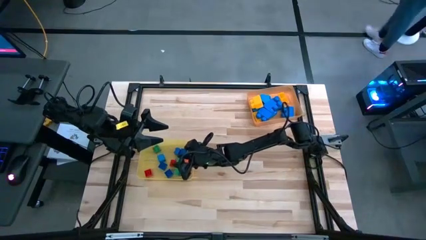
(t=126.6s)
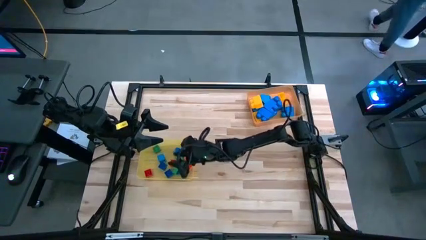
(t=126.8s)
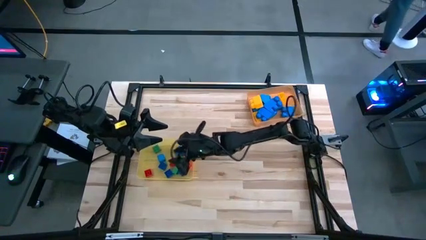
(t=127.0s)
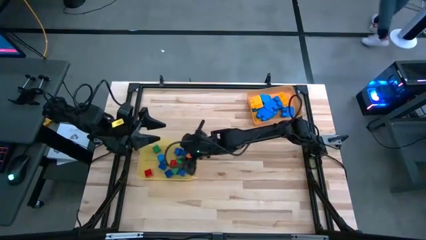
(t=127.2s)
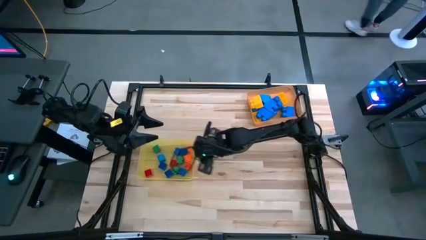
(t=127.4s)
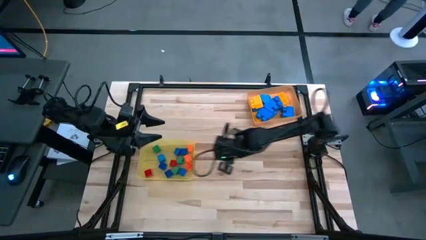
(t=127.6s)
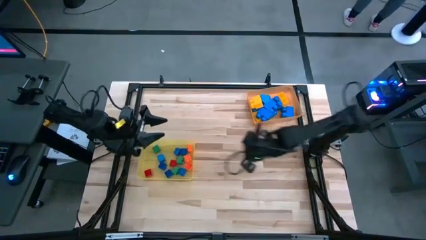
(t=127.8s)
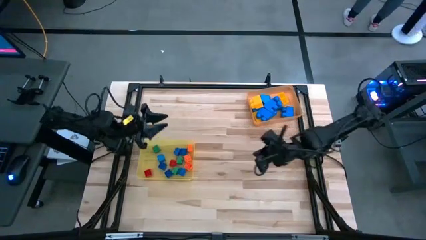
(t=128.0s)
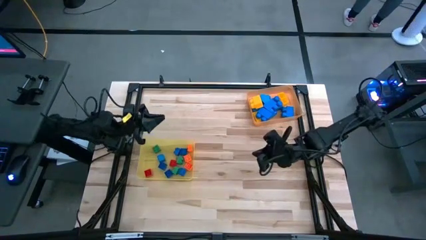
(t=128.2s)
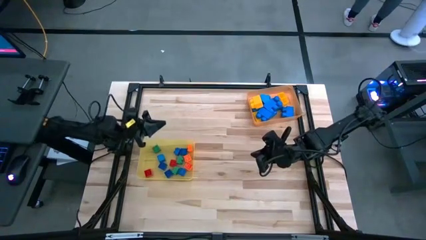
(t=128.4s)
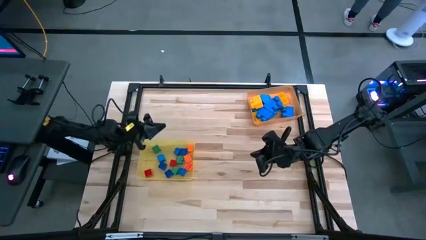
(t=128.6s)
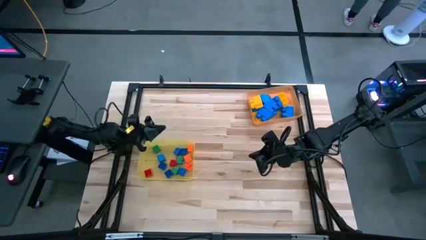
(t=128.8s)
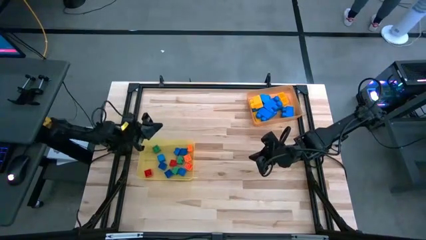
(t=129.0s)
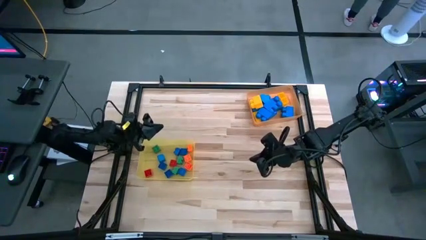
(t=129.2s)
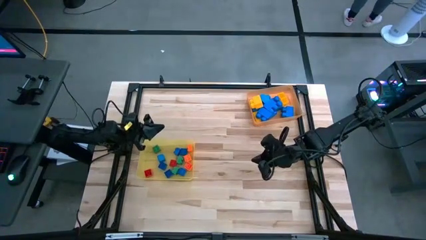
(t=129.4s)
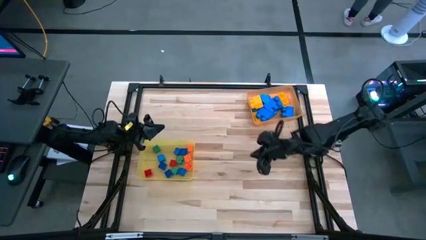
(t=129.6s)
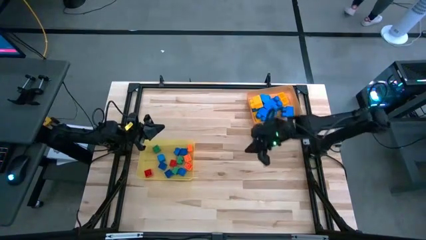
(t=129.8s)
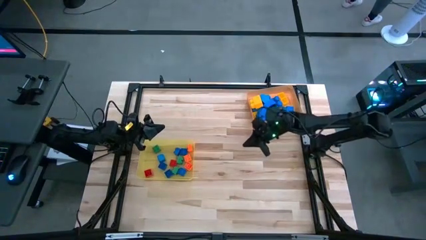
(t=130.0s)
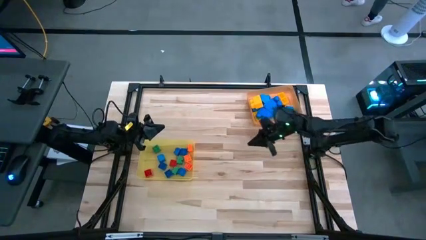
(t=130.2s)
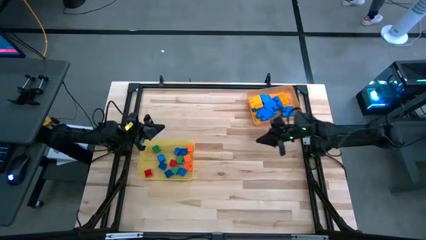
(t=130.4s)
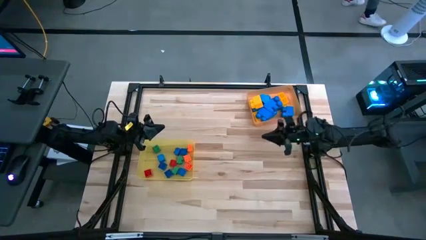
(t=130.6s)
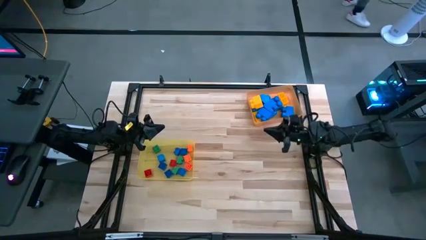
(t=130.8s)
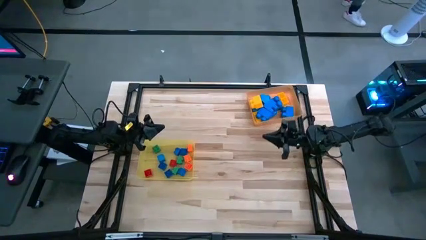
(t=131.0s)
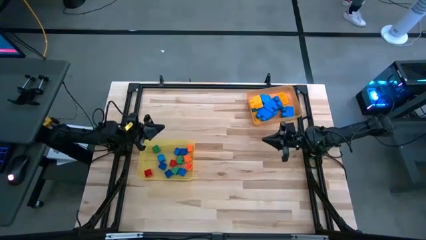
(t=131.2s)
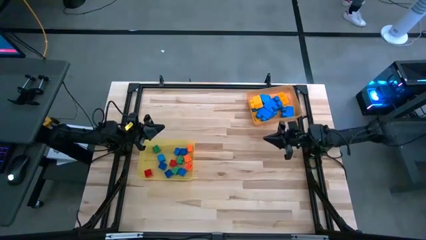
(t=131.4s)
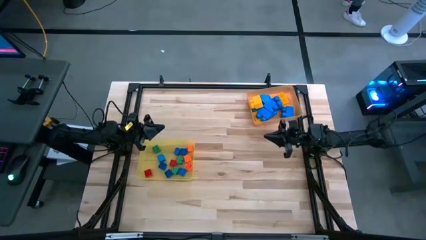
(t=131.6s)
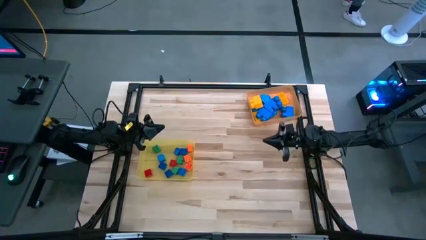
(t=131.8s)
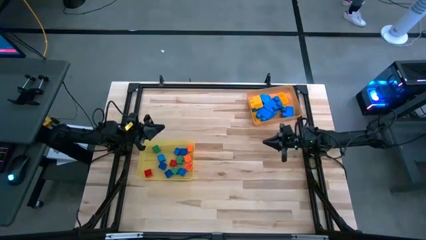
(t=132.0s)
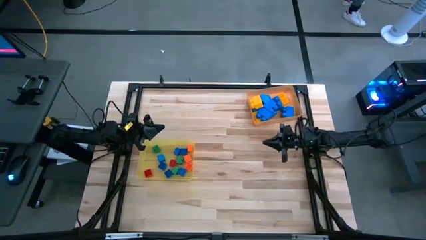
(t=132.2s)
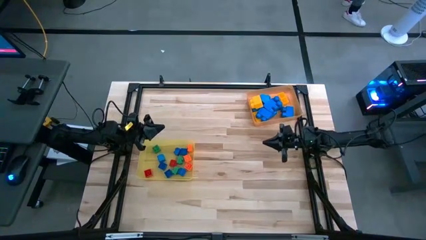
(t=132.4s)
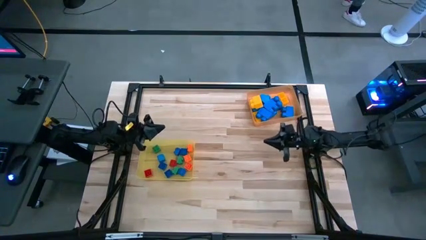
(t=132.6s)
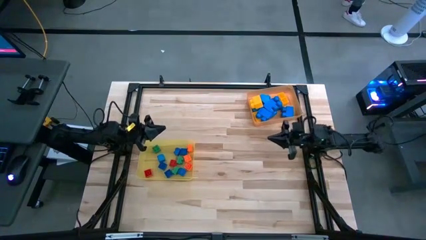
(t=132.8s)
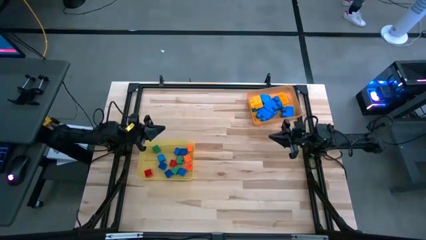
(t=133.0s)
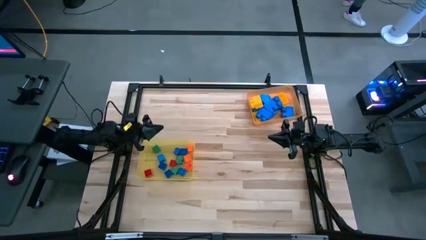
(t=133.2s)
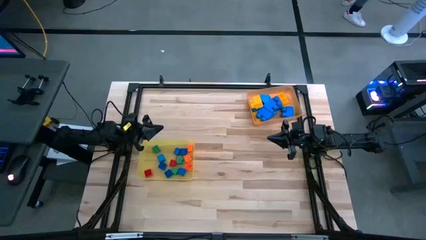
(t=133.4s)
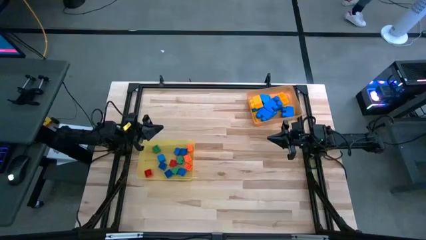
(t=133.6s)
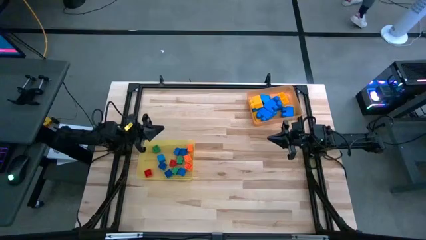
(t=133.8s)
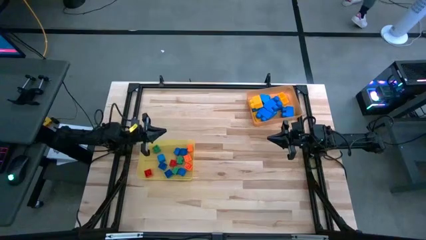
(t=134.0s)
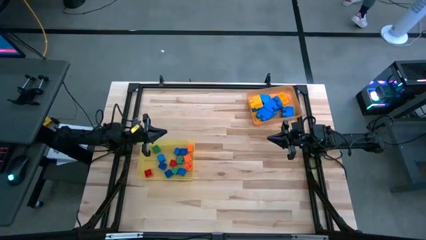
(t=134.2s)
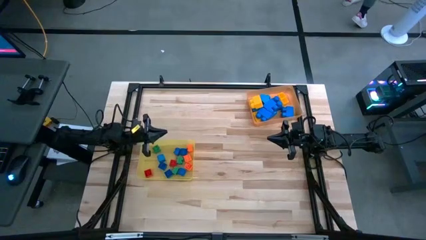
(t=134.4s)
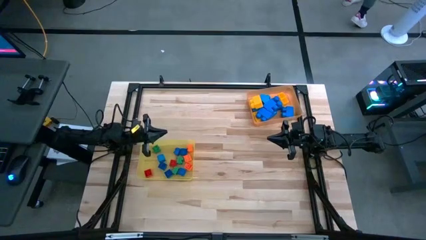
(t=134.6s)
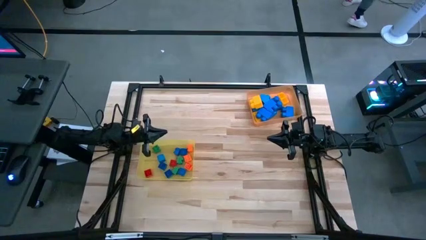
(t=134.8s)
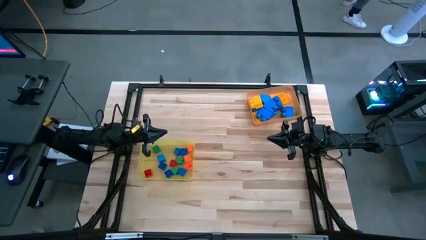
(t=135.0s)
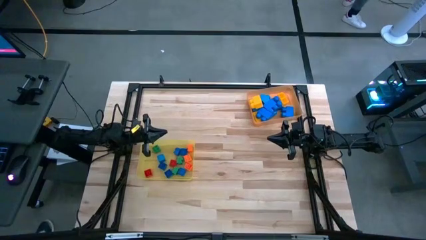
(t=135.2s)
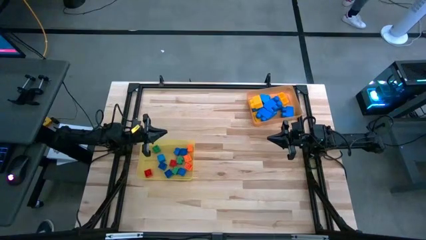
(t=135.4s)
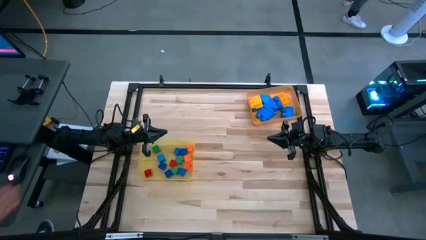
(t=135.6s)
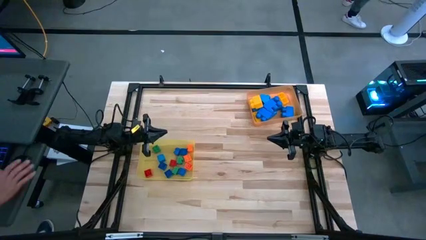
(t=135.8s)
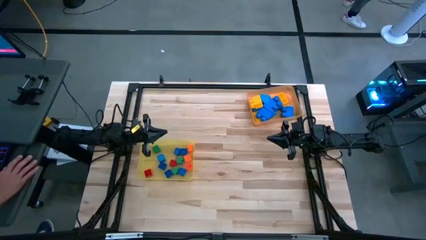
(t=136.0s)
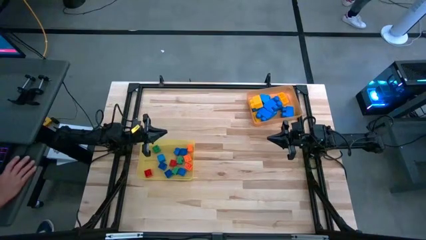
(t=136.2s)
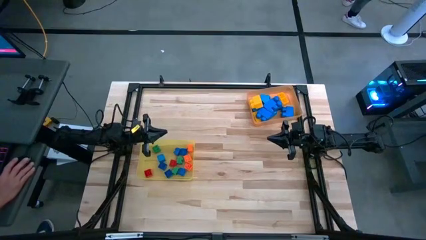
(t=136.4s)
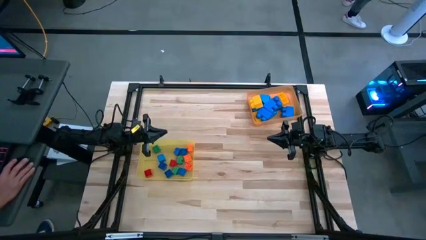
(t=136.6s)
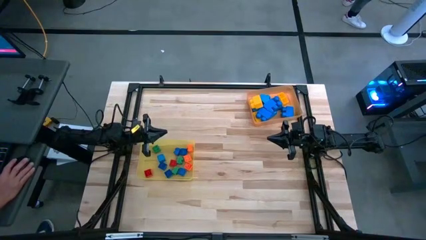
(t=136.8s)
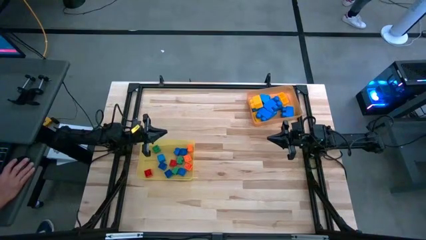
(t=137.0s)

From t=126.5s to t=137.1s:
Task: Sort blocks by size
Return to Home Position

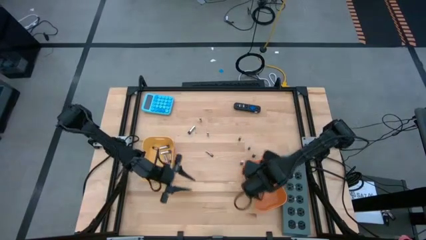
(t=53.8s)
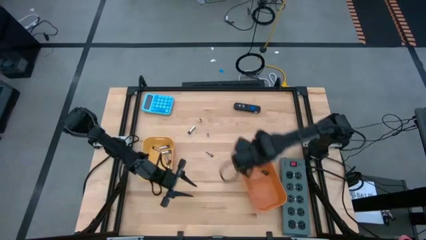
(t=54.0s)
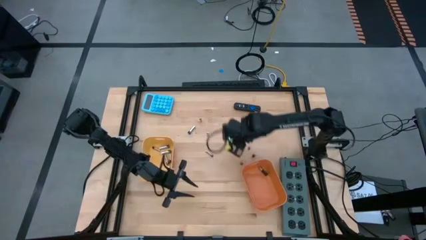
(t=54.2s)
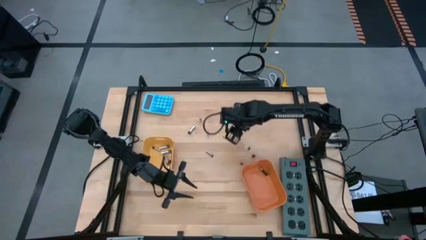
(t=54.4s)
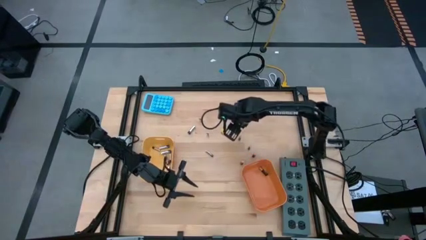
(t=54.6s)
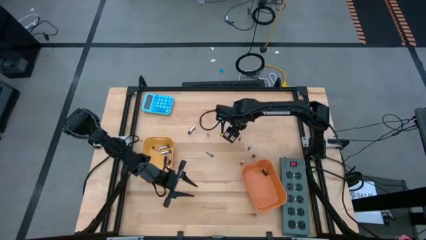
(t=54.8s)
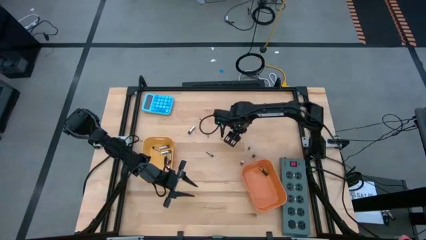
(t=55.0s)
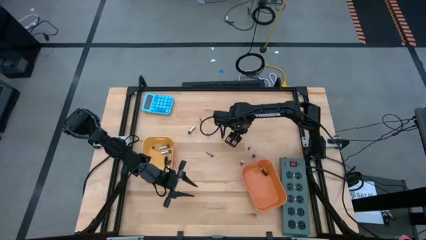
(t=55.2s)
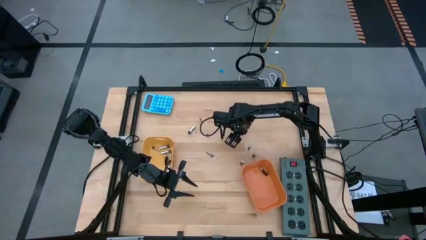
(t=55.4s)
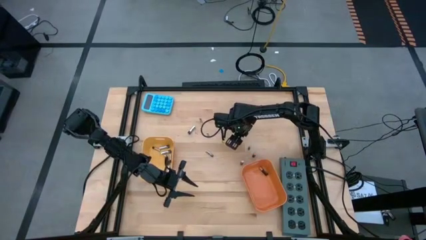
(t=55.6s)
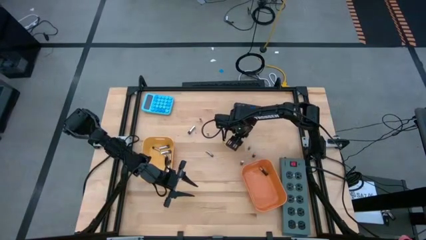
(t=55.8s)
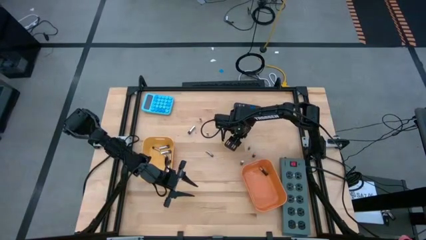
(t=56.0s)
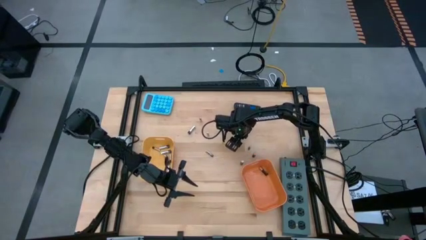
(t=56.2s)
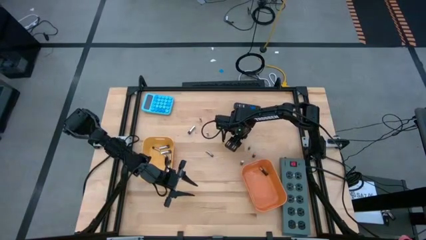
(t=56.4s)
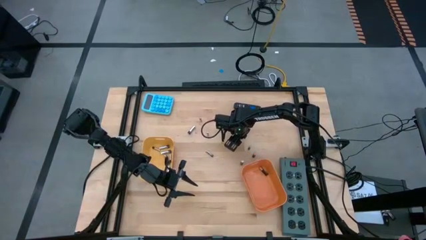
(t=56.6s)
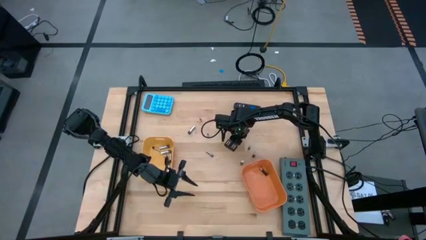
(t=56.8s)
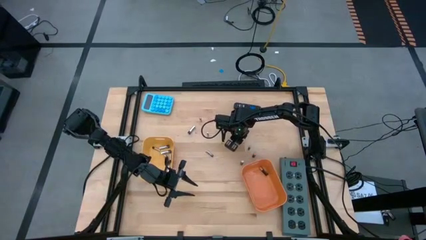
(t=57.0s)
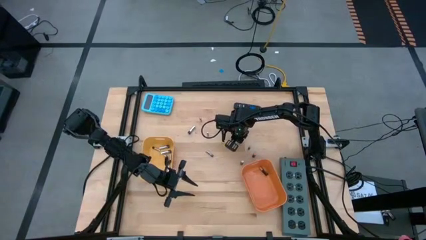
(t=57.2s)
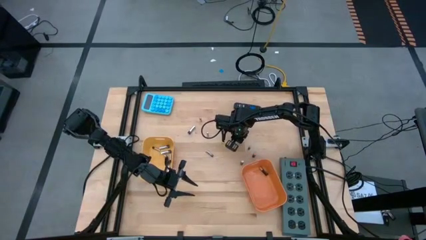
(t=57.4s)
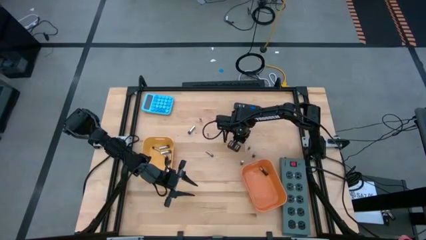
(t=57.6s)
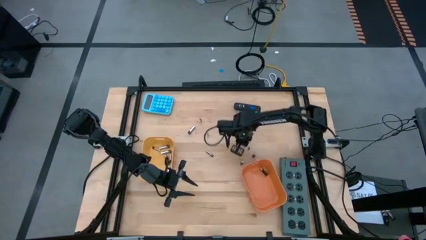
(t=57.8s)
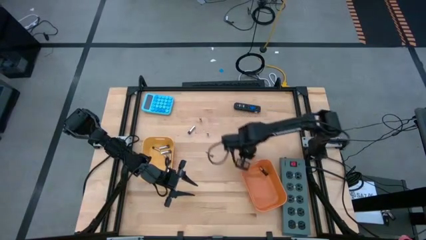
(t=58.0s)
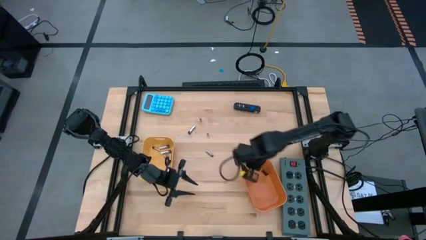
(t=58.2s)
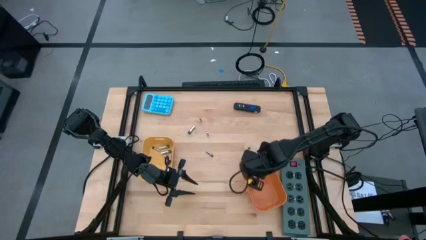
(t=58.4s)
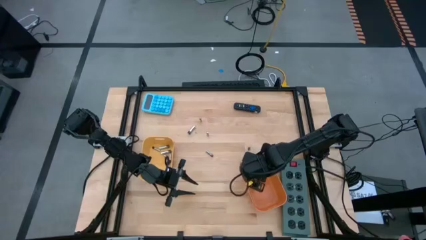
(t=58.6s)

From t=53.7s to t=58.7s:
Task: Sort batteries
Put the black battery into the orange bin
